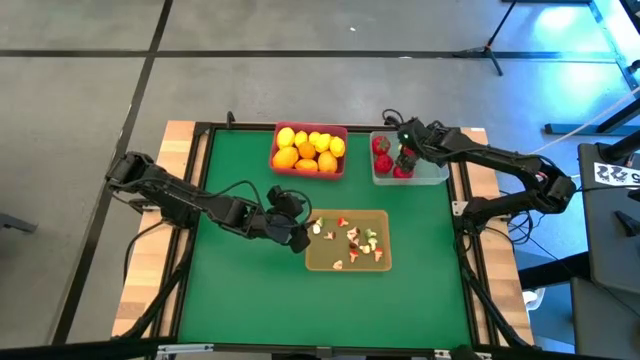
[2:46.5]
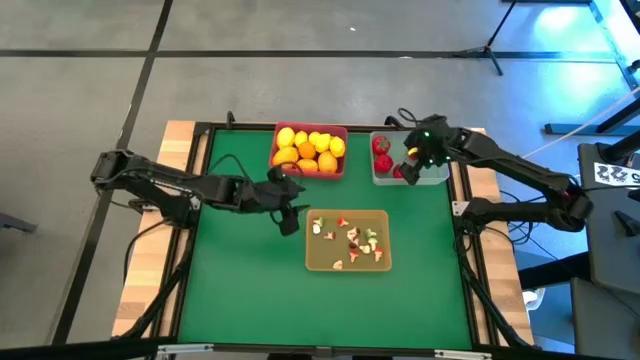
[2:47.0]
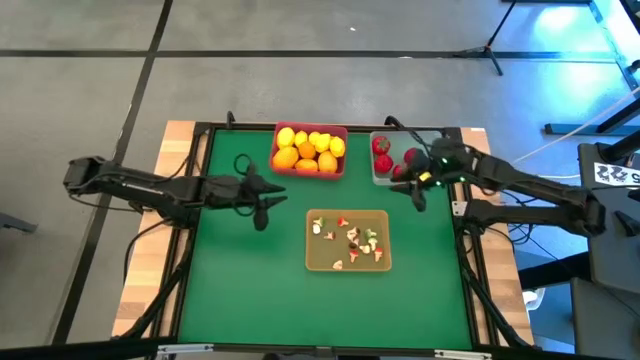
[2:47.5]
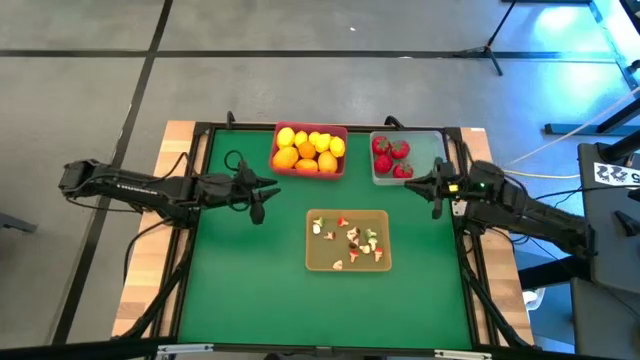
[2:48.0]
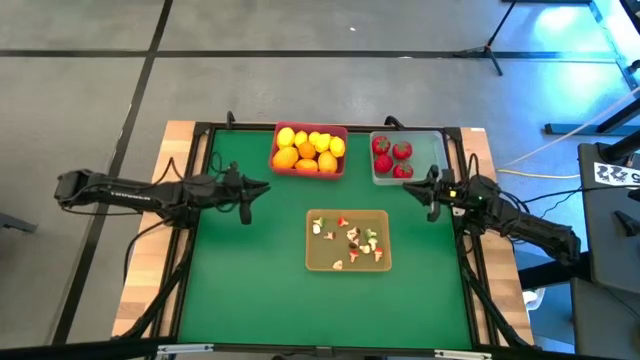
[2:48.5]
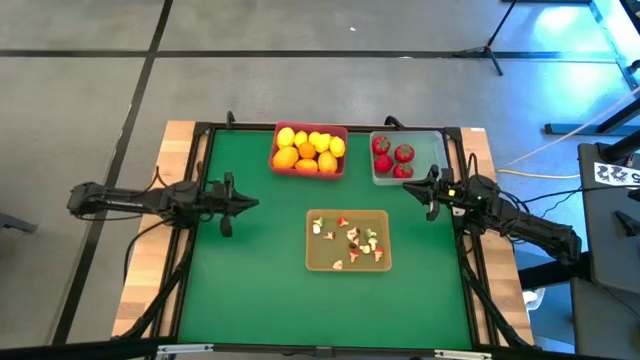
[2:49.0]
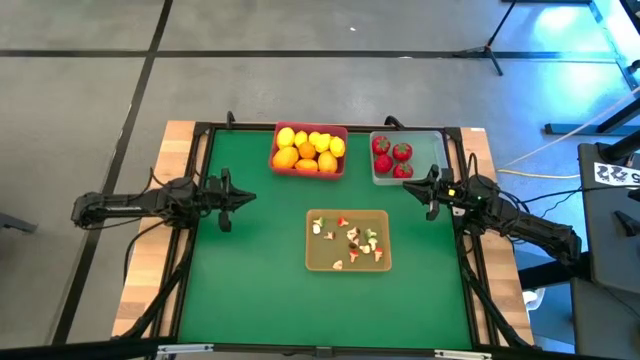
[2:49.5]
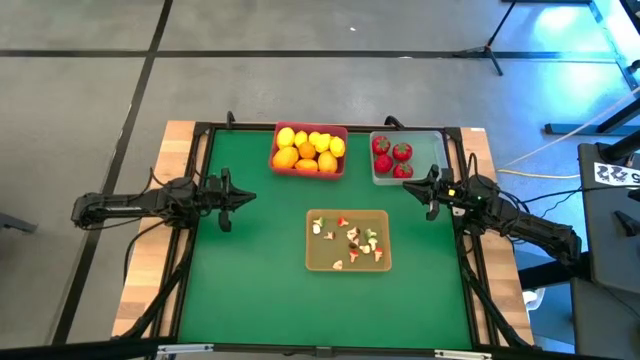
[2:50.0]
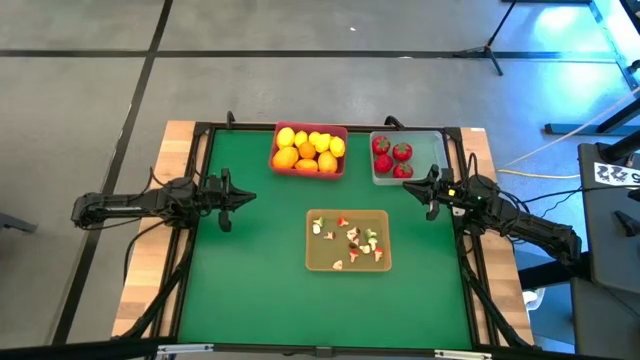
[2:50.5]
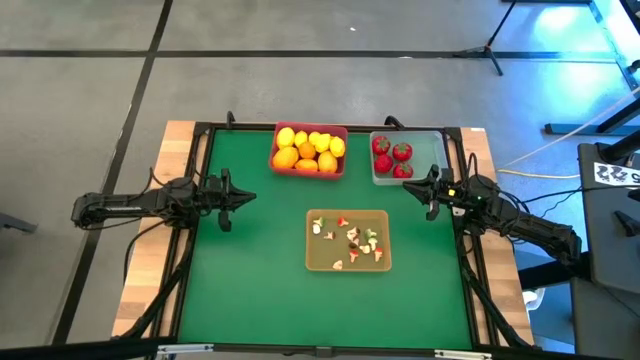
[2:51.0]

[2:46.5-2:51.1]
Task: Sort produce into baskets
Return to Home Position

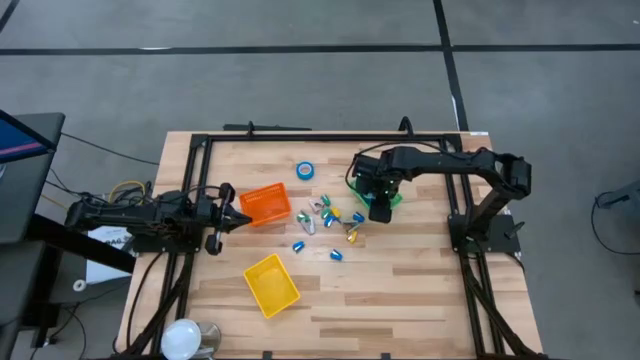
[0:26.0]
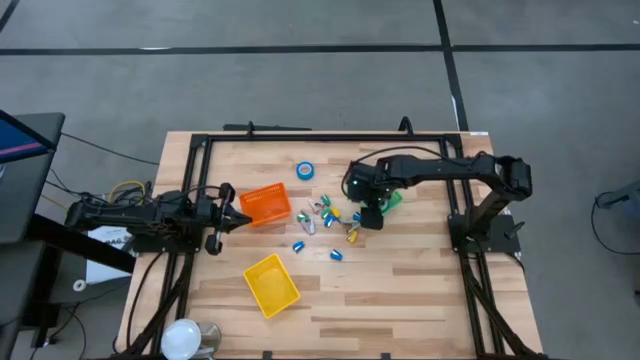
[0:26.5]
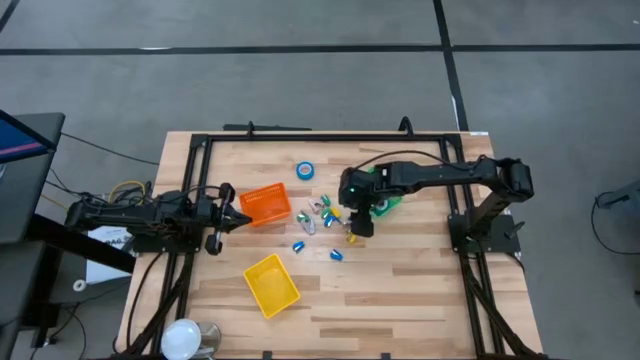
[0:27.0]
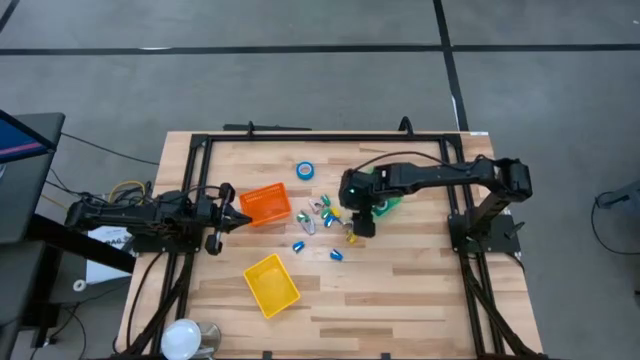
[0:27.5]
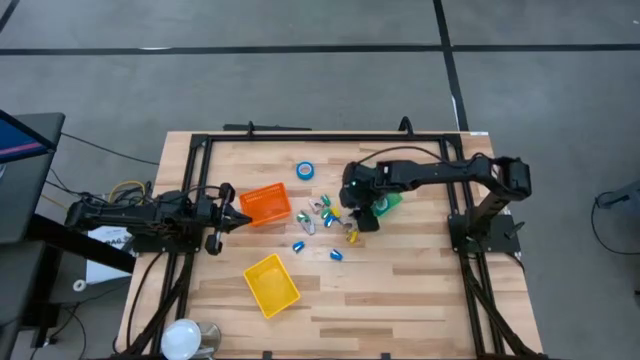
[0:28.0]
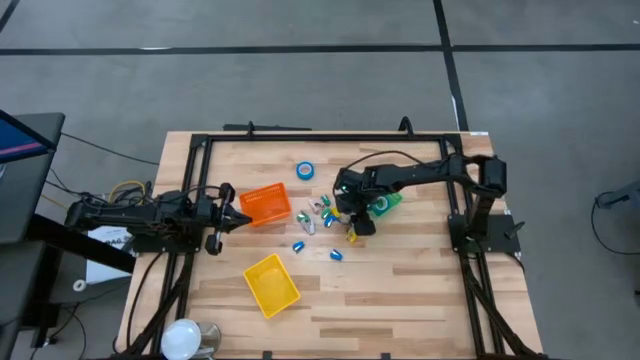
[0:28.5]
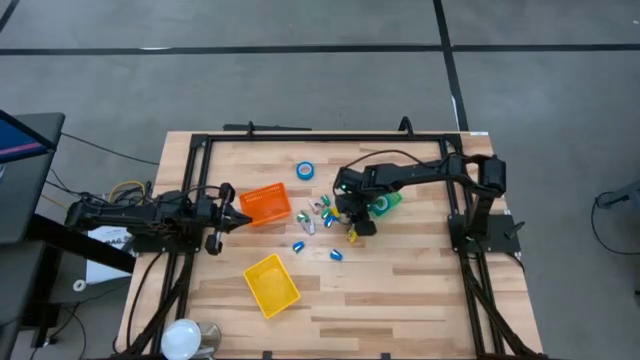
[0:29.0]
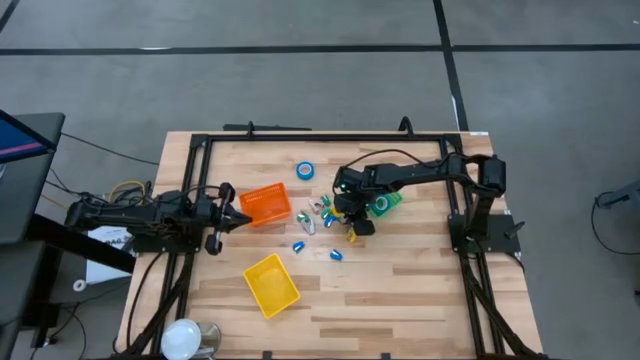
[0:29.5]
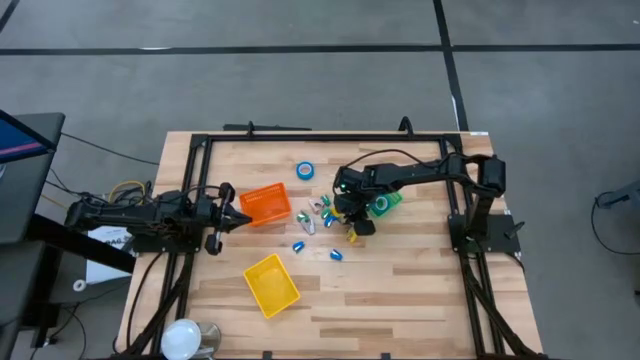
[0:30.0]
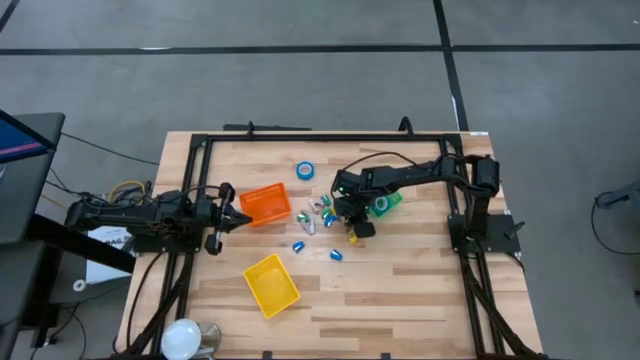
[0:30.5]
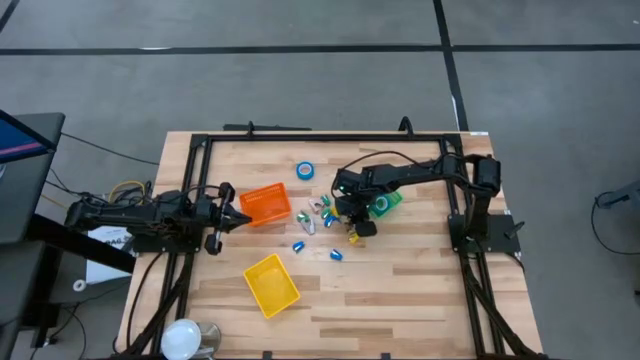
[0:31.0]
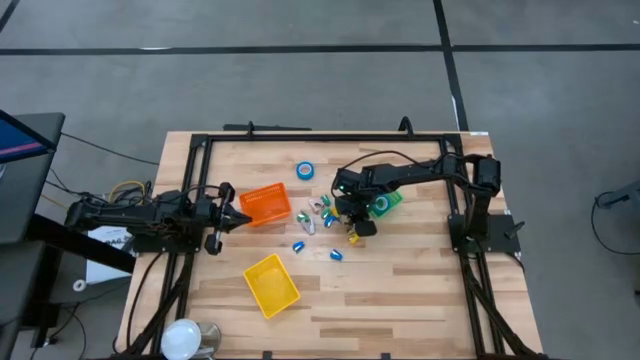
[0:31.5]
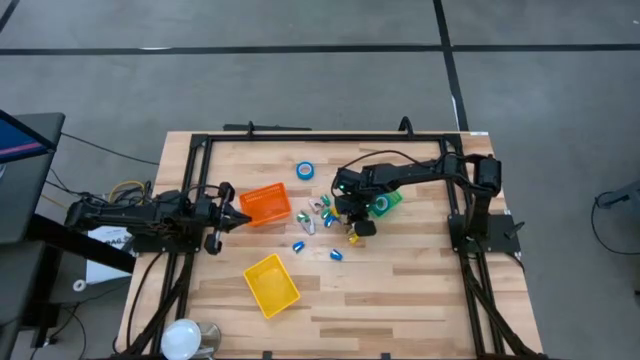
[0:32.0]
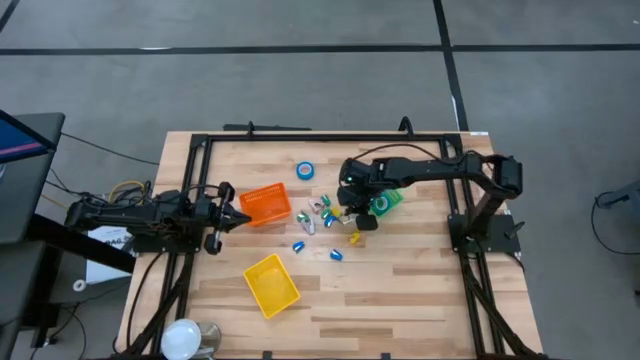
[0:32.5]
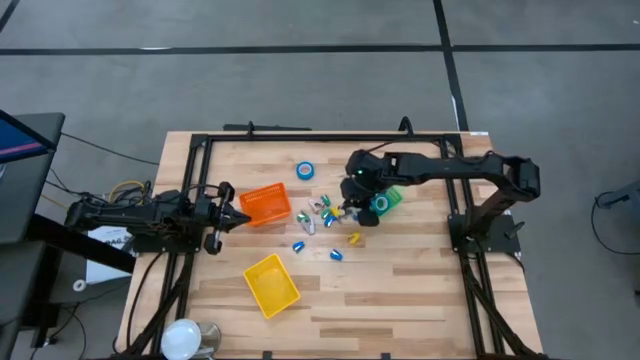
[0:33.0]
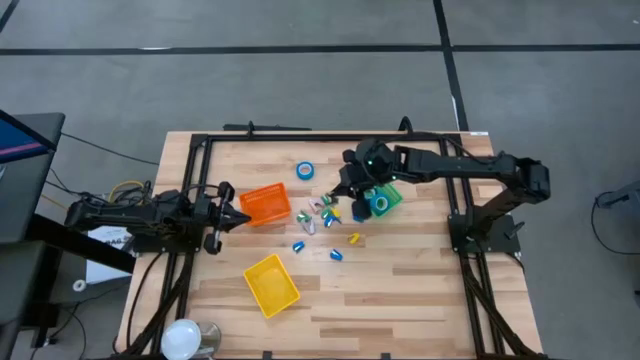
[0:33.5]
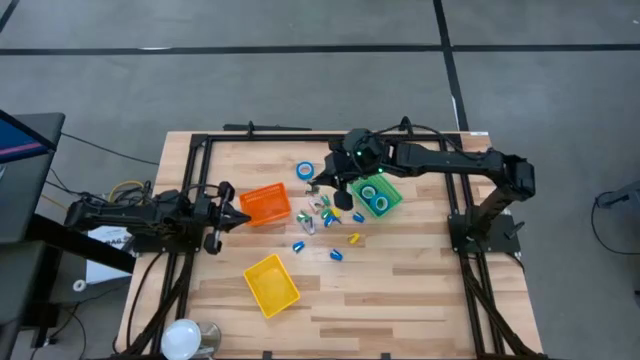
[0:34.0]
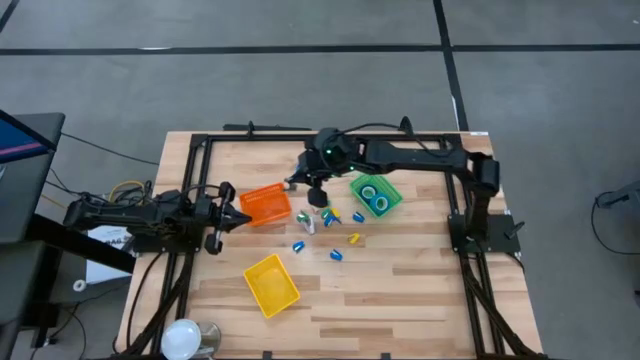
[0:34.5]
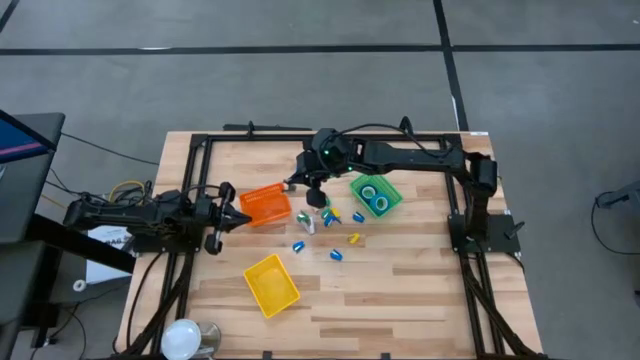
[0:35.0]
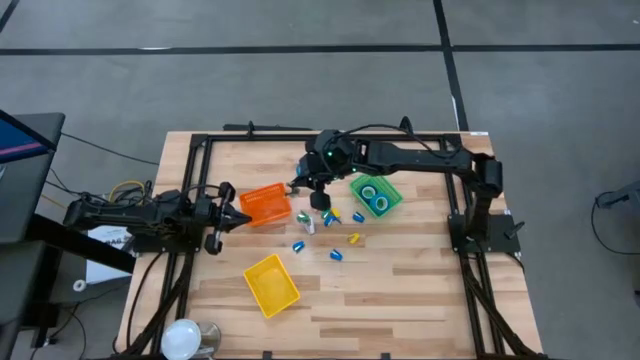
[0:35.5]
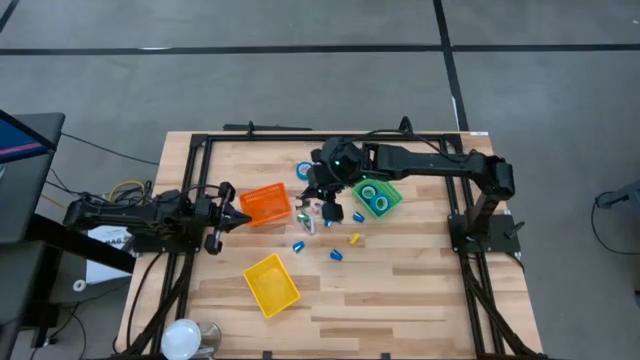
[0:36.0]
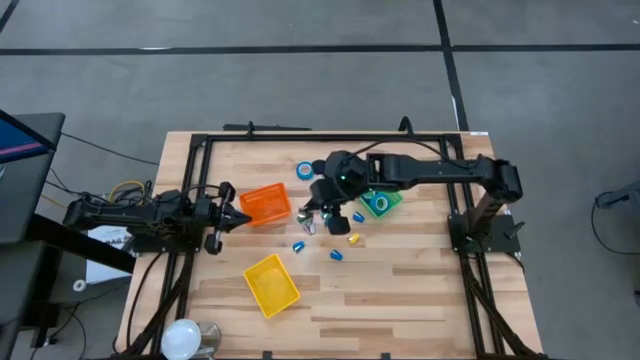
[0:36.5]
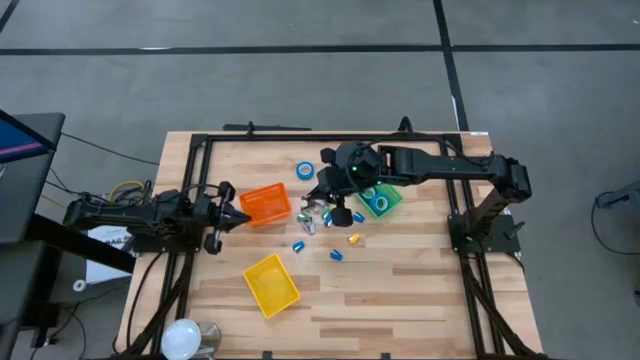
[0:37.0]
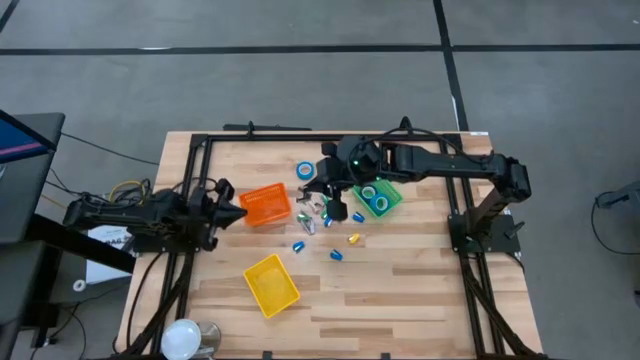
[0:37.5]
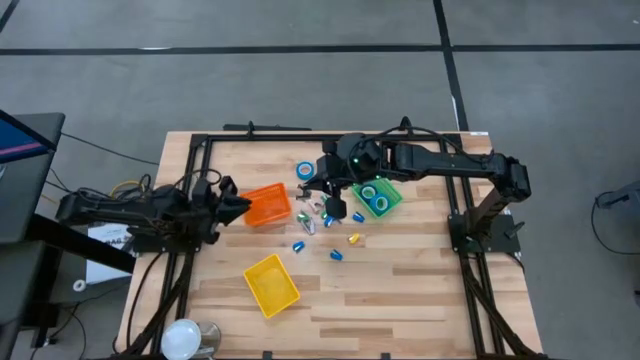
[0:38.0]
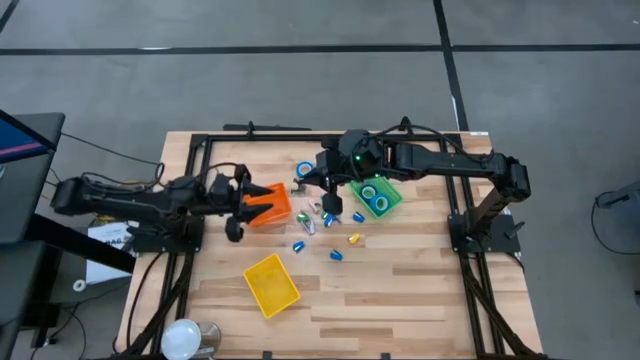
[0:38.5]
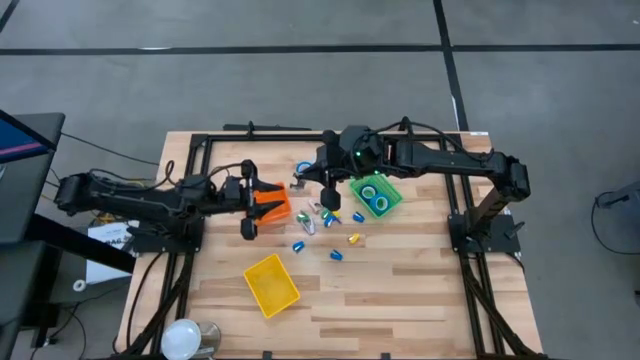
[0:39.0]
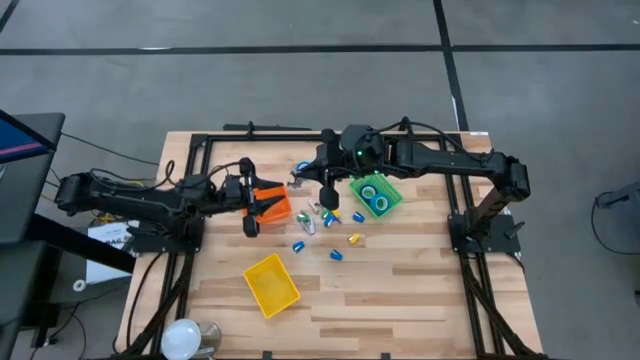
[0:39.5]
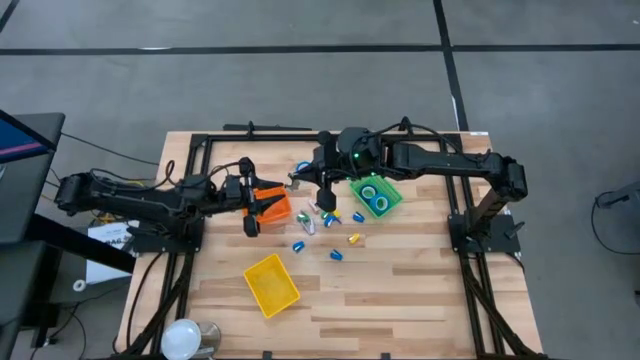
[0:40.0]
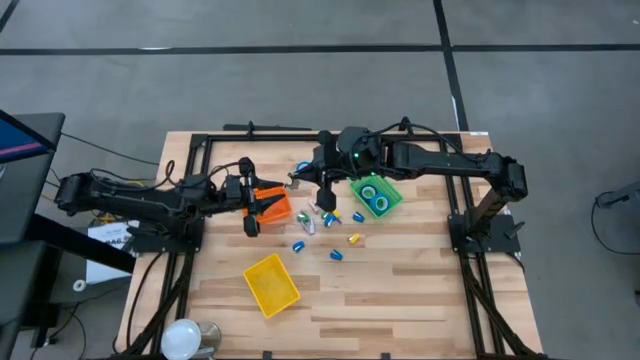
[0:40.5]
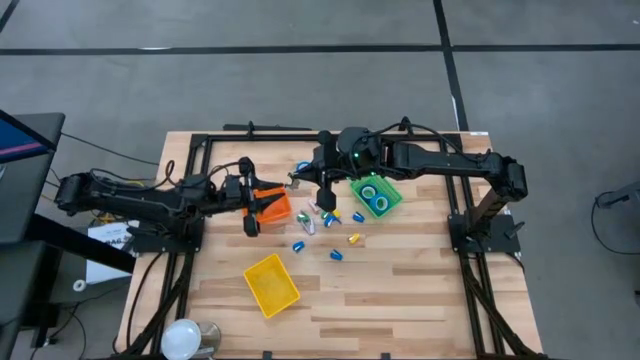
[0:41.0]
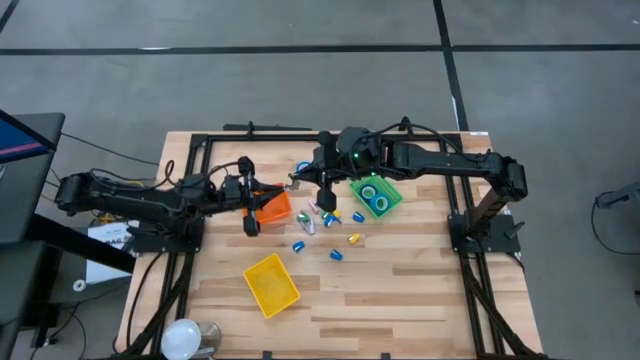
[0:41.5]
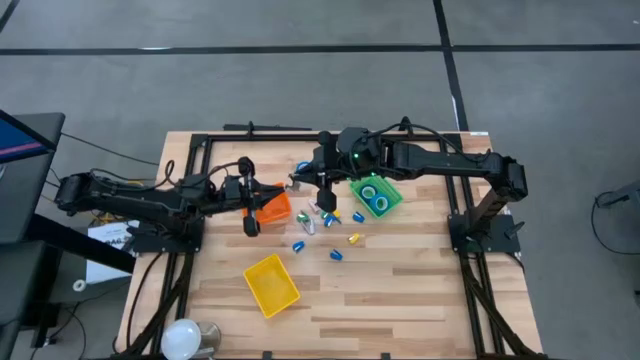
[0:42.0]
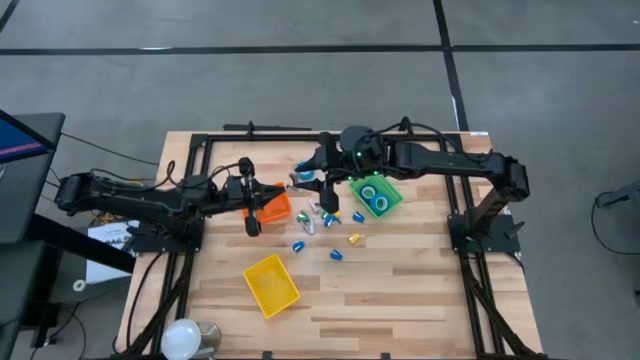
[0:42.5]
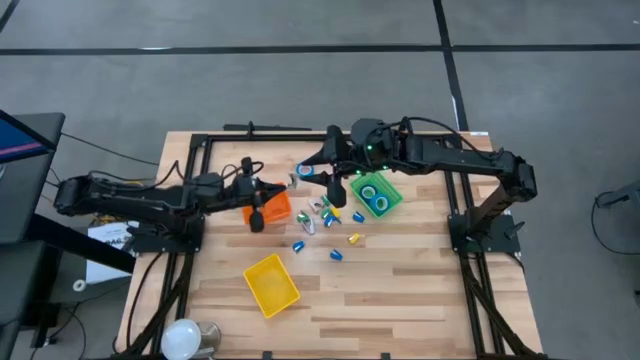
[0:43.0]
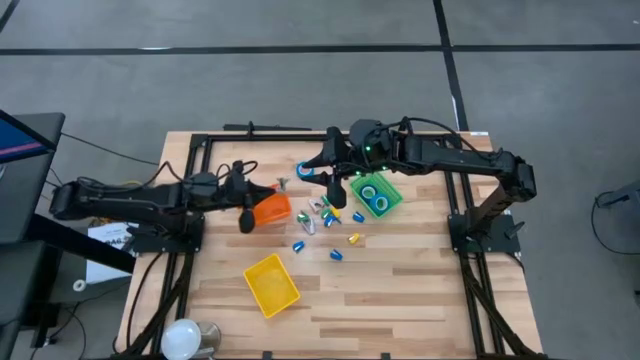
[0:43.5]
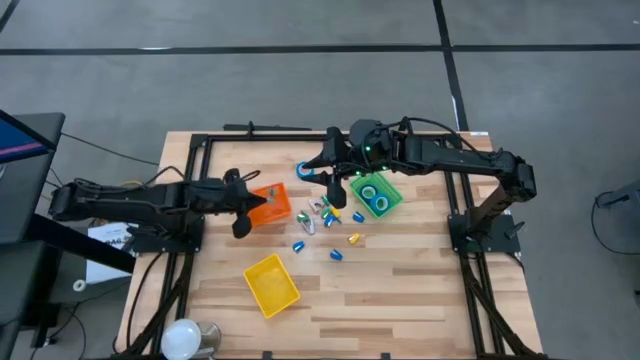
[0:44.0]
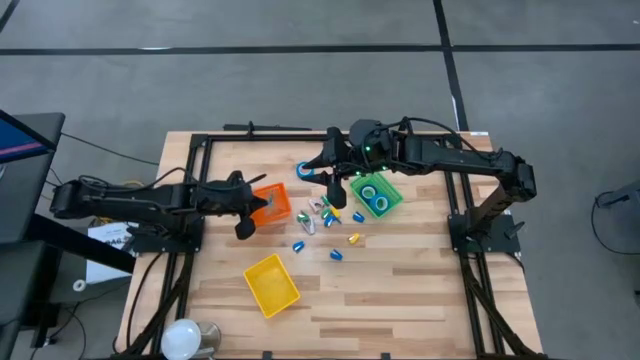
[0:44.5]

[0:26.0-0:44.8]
Task: Pick and place Stapler, Stapler remover, tape
Put the gray staple remover into the orange basket
